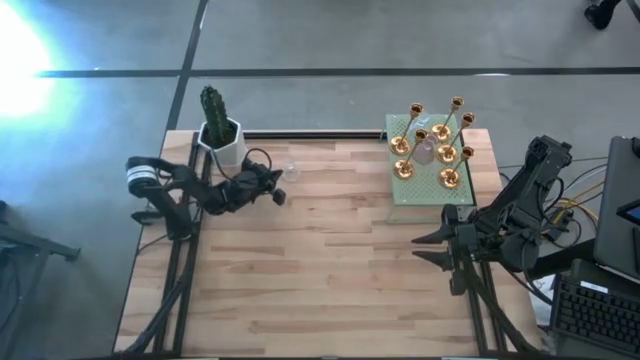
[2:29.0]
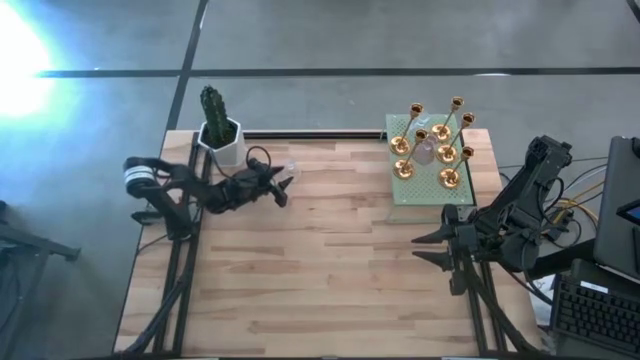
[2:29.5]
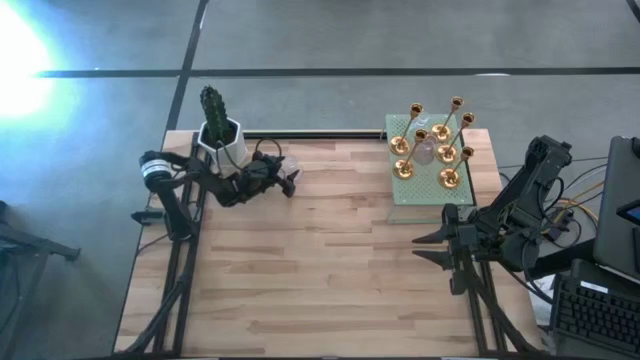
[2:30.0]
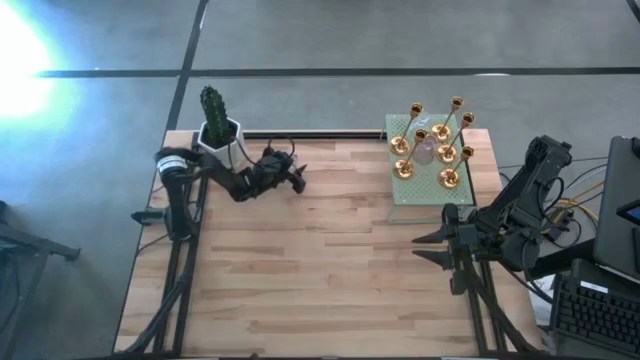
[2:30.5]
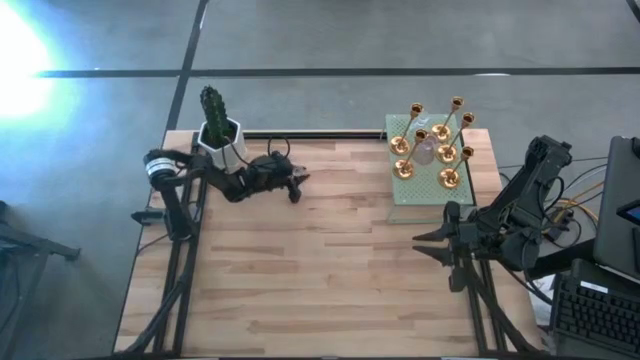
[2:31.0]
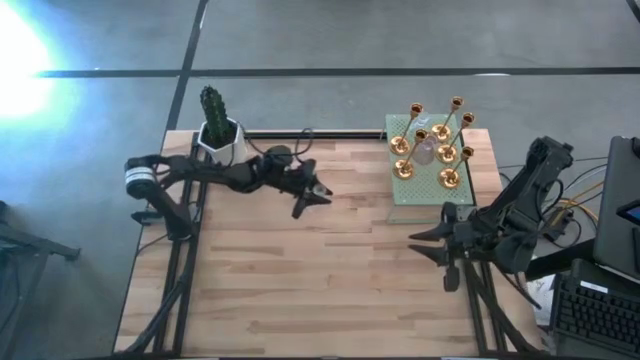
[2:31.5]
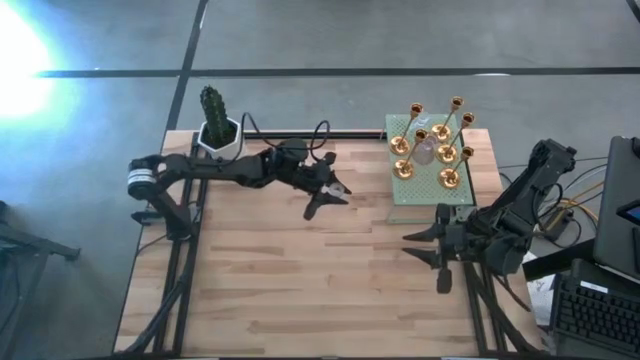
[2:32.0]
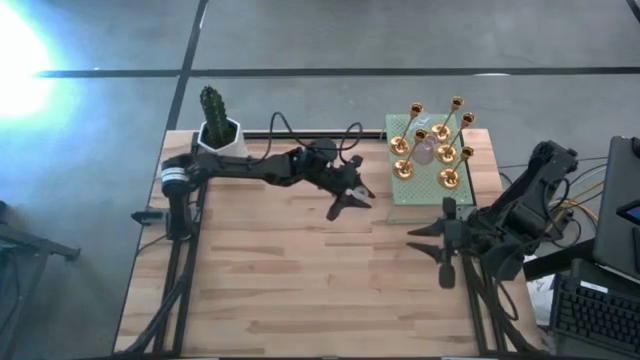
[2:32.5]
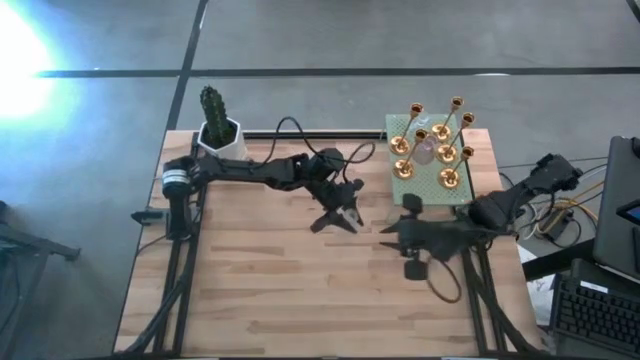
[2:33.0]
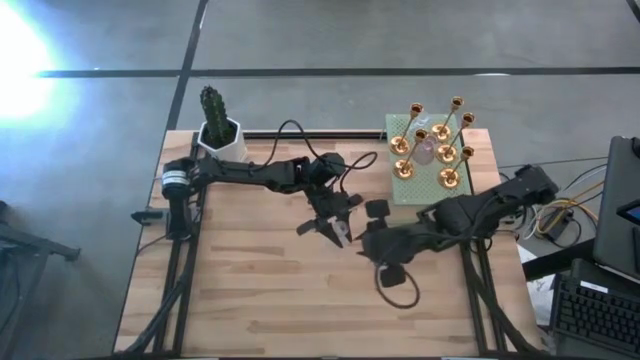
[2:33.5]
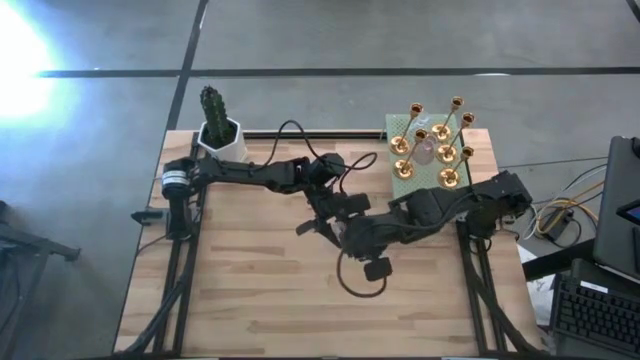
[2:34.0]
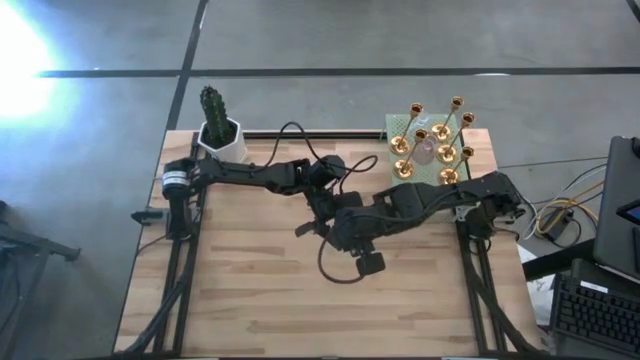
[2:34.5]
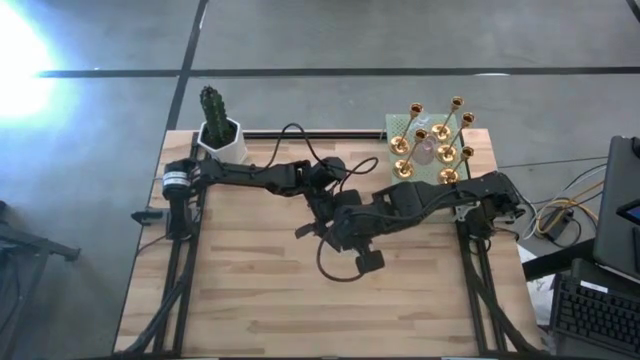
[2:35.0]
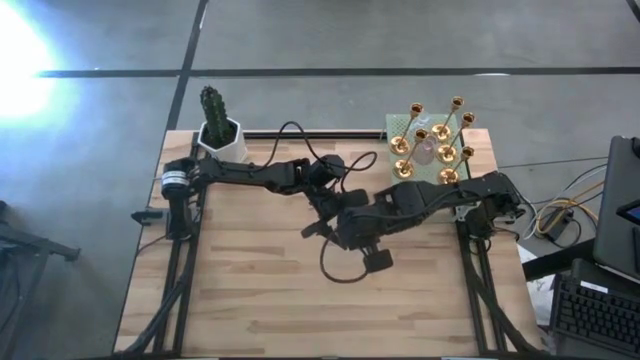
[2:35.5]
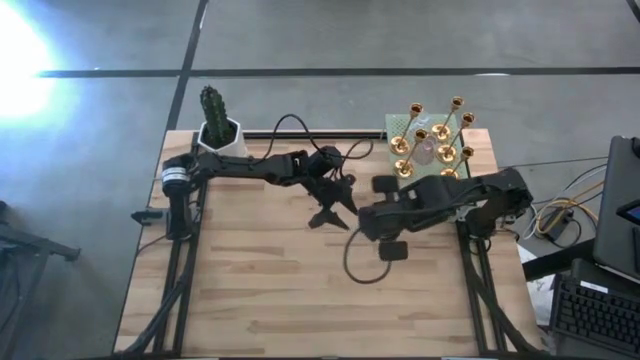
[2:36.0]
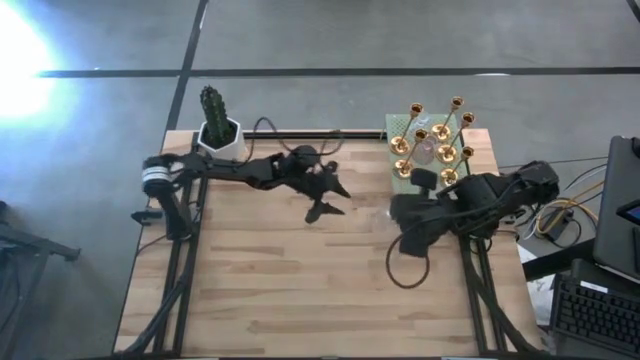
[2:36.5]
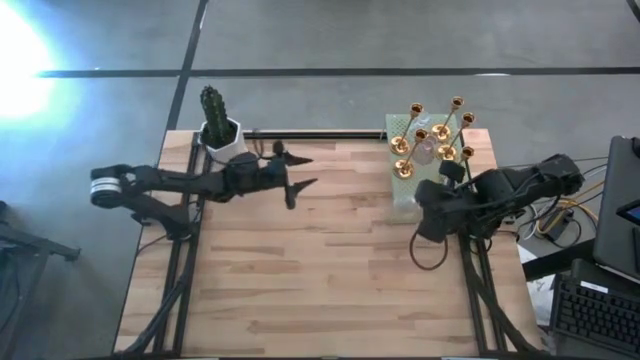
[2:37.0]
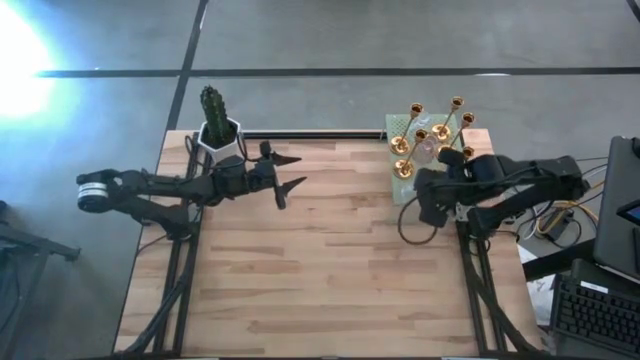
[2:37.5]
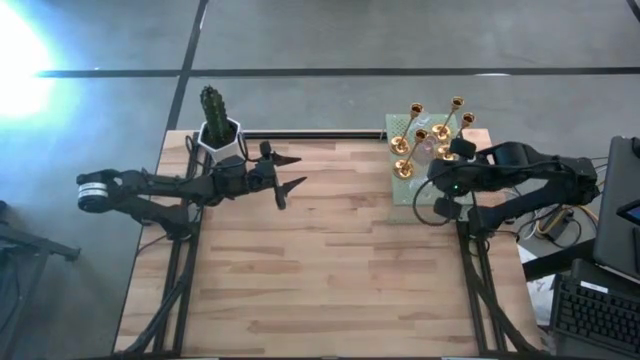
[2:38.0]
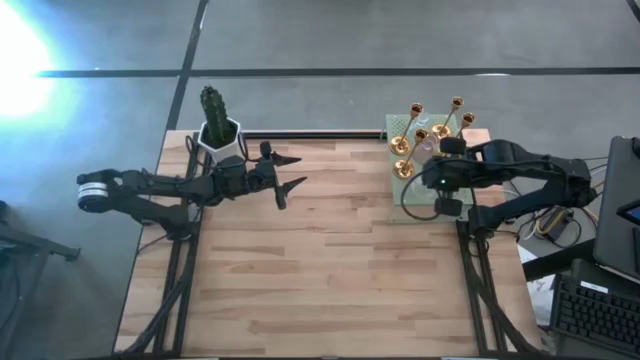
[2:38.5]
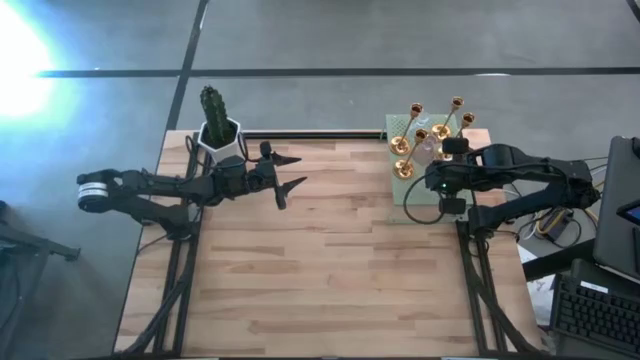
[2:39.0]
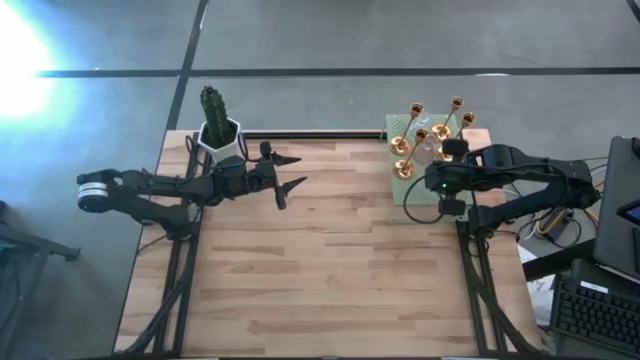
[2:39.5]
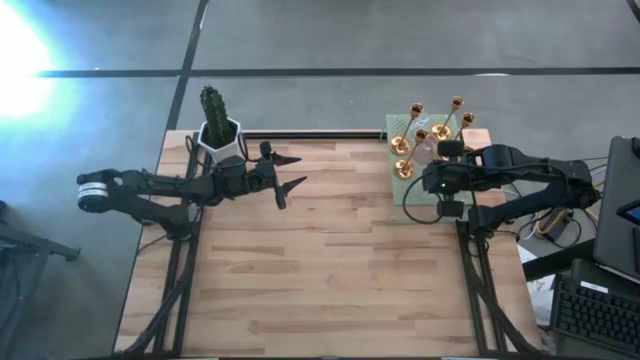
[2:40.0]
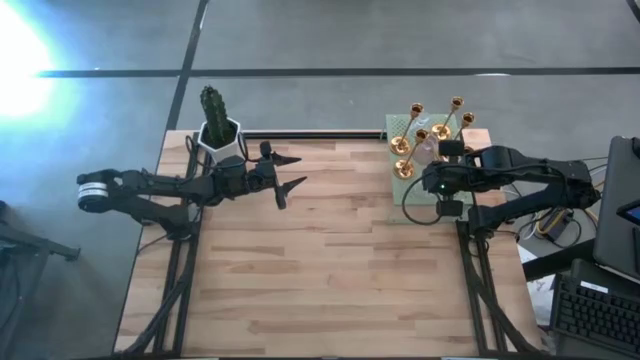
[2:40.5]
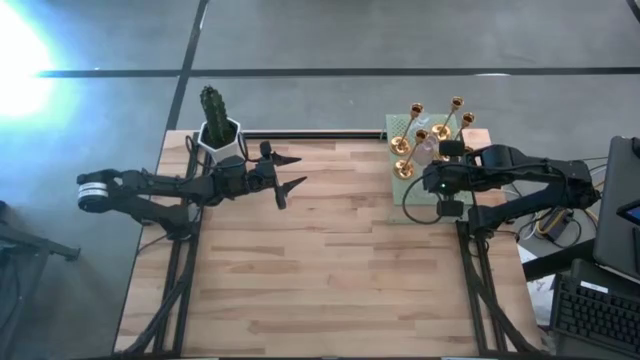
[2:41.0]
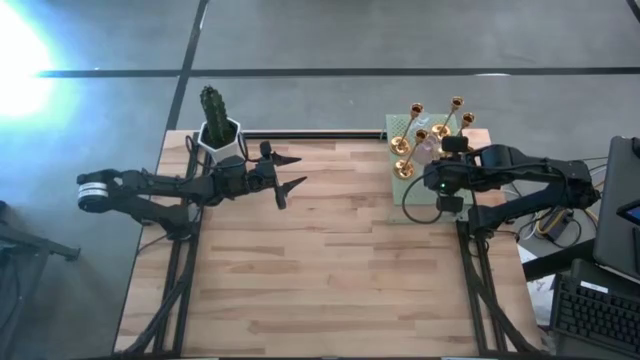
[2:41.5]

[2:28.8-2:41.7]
Task: Pick & Place candle stick holders
Put the transparent glass candle holder on the shelf

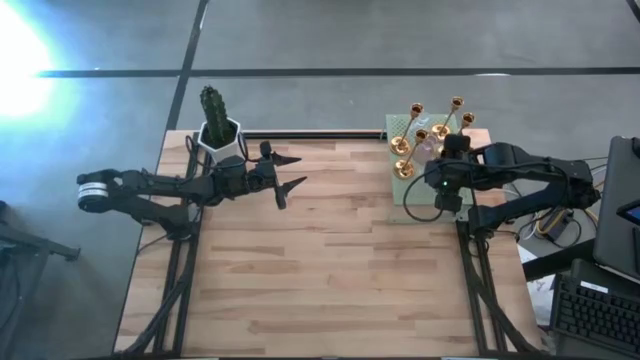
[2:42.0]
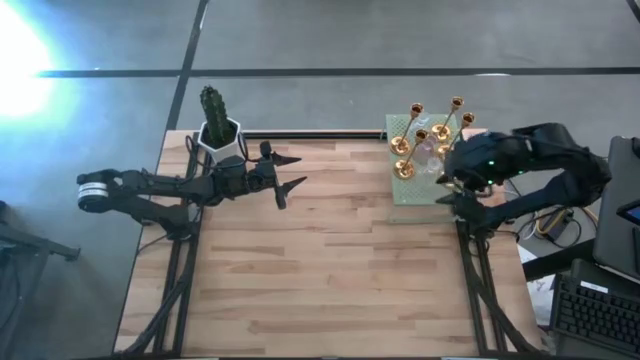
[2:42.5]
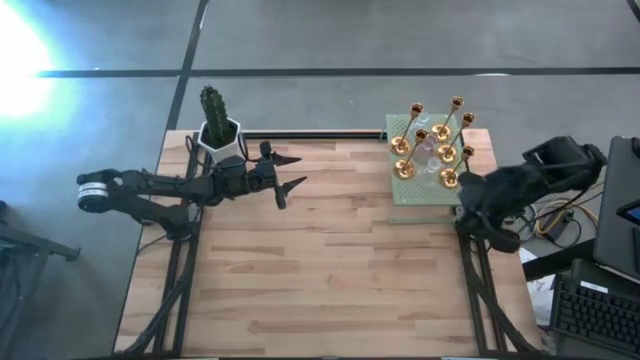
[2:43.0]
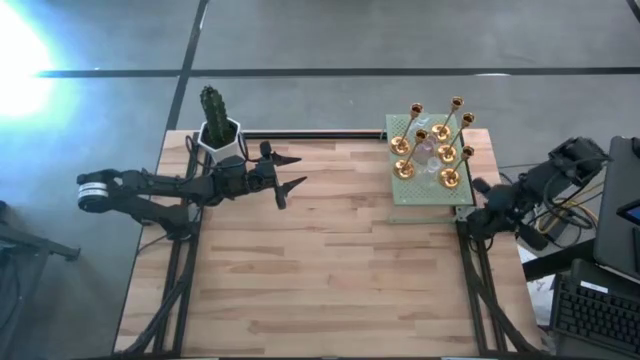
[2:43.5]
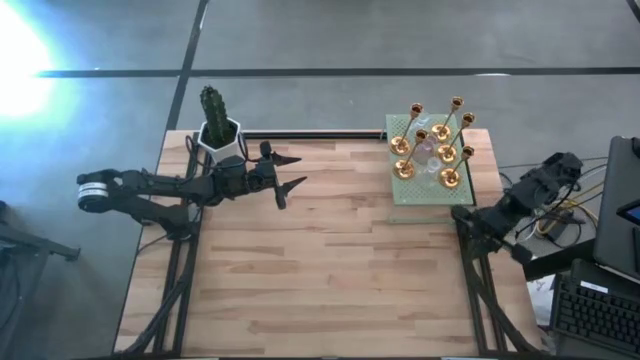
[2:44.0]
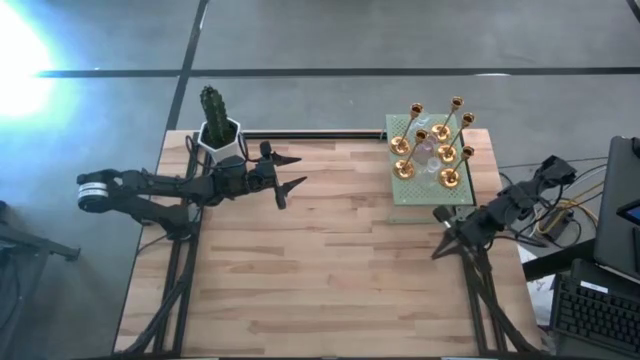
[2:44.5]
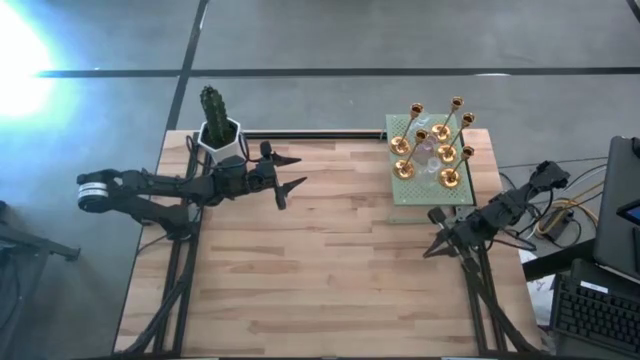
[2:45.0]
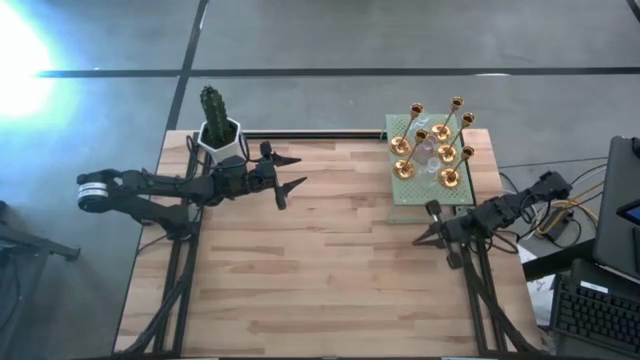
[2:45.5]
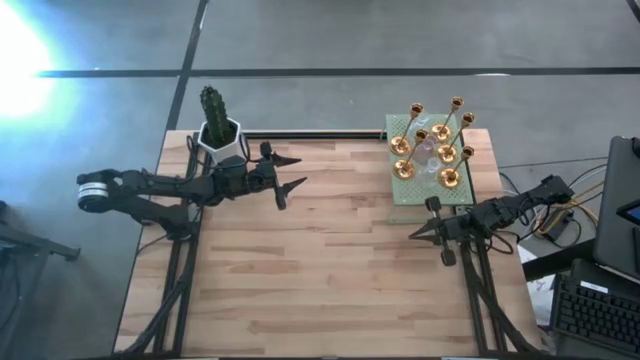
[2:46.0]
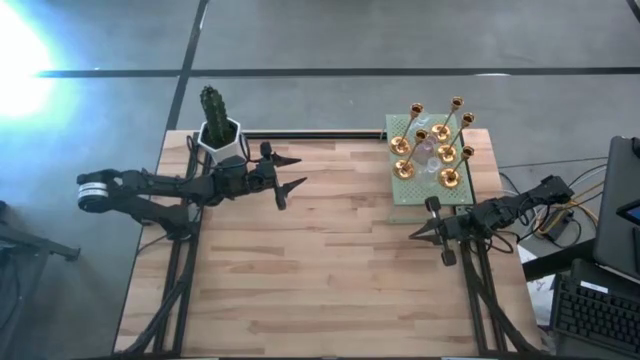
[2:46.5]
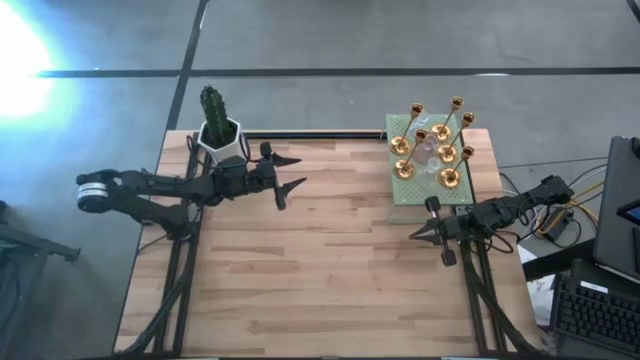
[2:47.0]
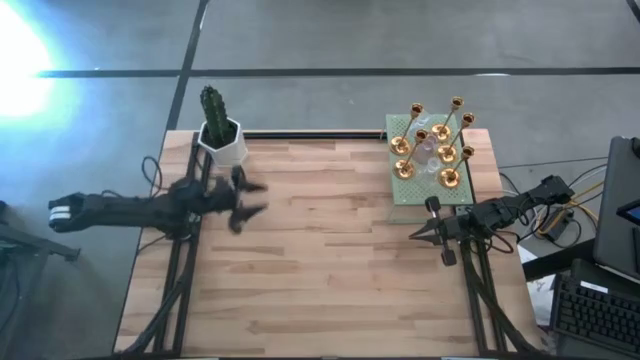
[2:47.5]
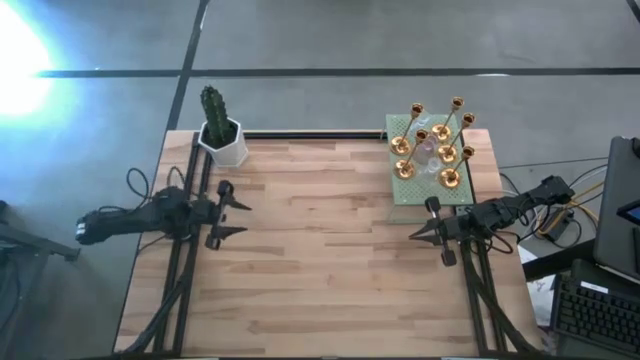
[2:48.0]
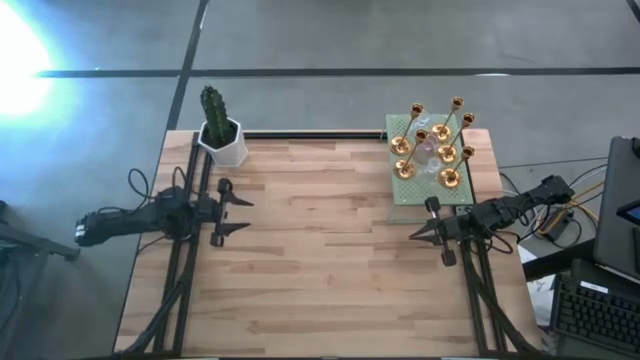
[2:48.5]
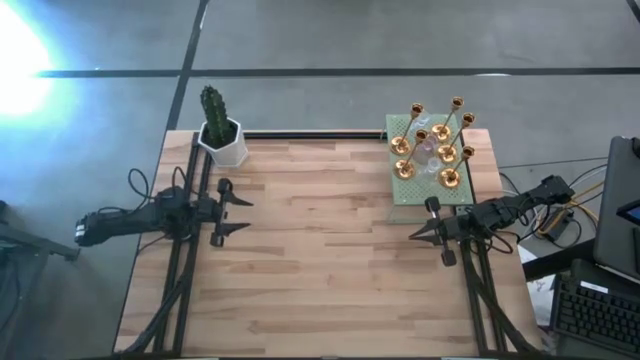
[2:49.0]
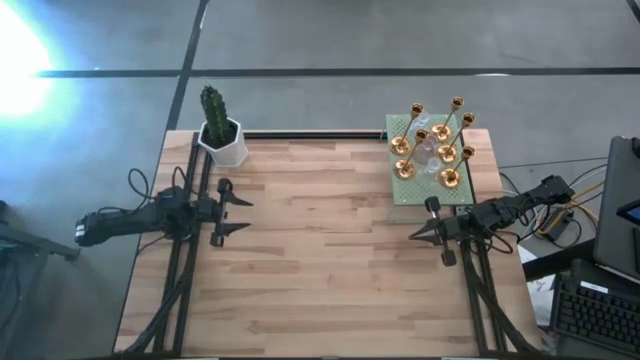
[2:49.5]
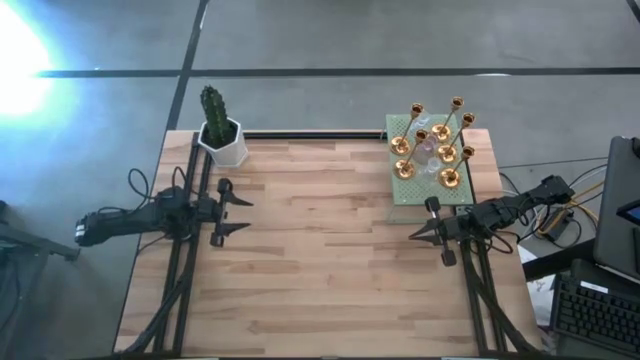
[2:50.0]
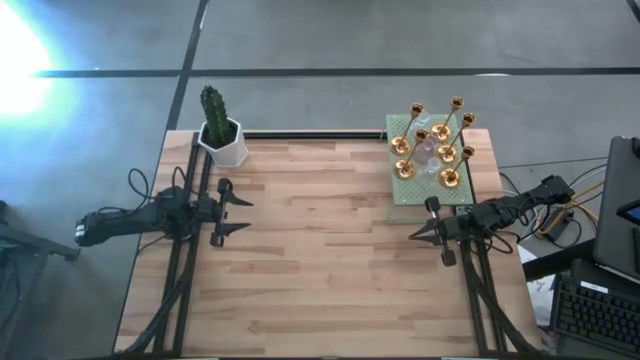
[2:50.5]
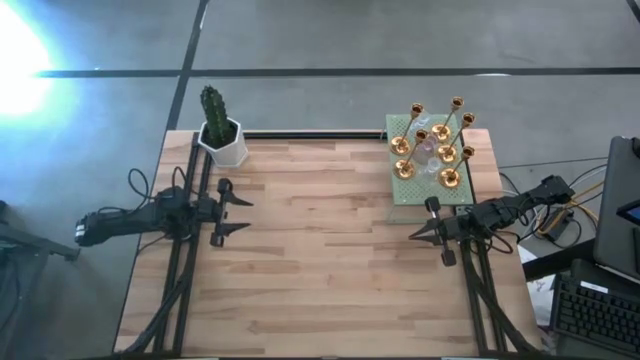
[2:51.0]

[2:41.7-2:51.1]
Return to Home Position
